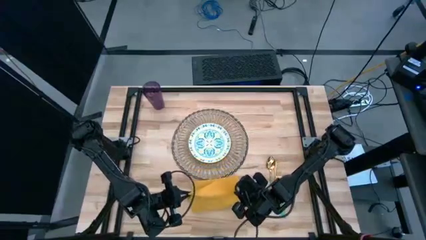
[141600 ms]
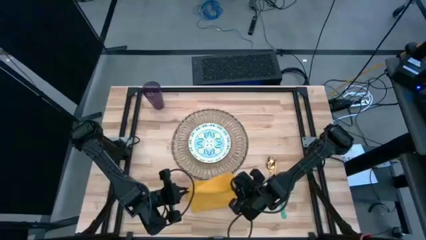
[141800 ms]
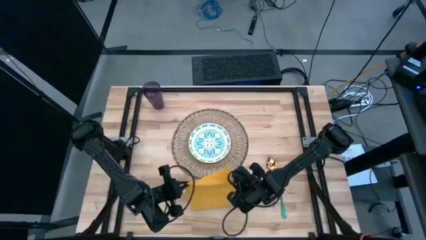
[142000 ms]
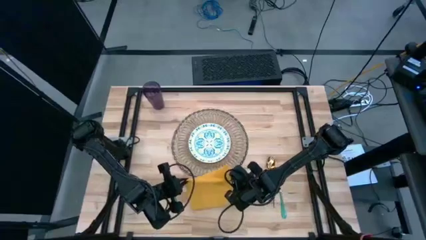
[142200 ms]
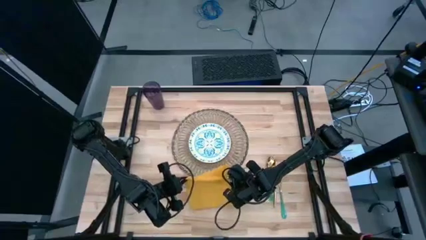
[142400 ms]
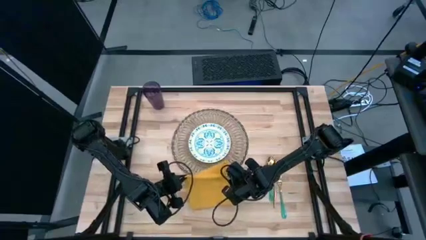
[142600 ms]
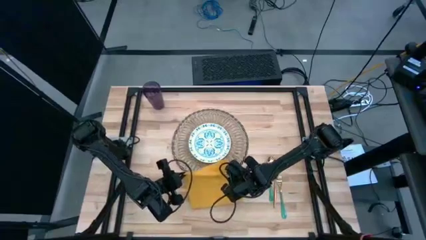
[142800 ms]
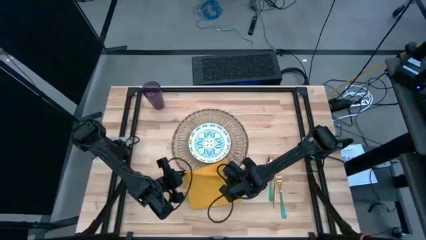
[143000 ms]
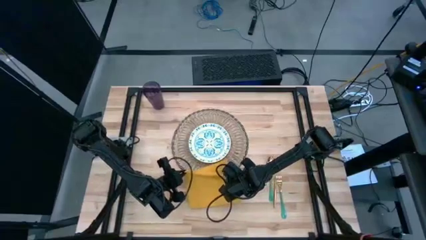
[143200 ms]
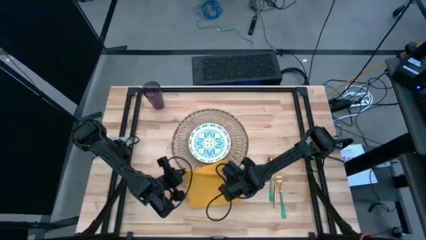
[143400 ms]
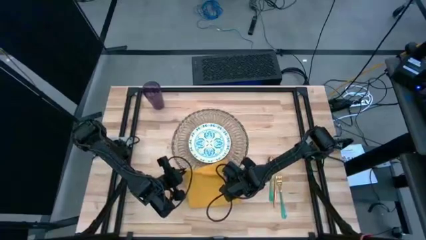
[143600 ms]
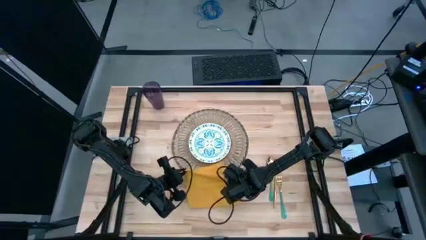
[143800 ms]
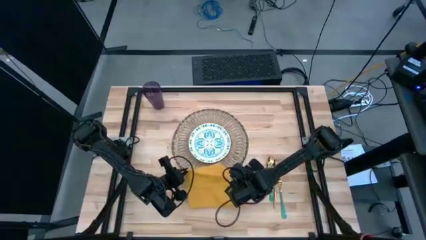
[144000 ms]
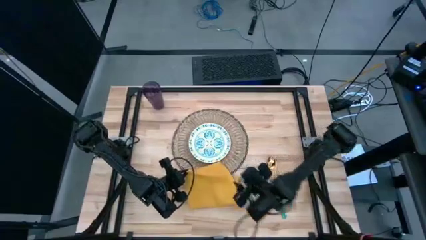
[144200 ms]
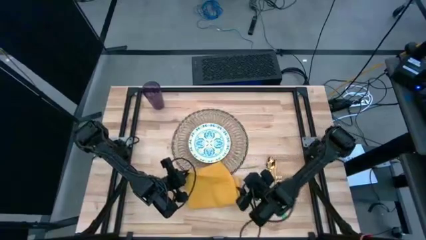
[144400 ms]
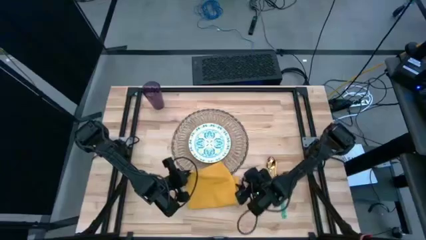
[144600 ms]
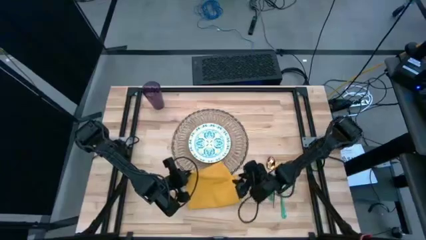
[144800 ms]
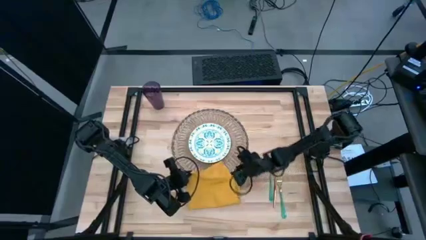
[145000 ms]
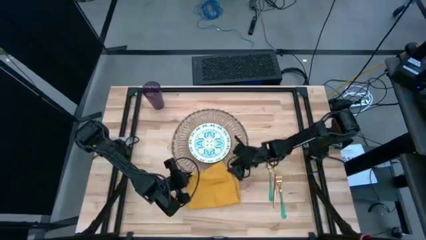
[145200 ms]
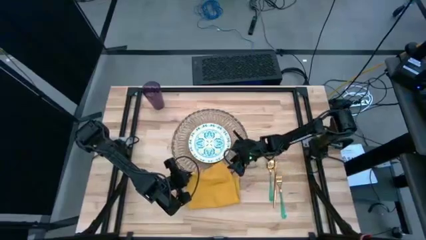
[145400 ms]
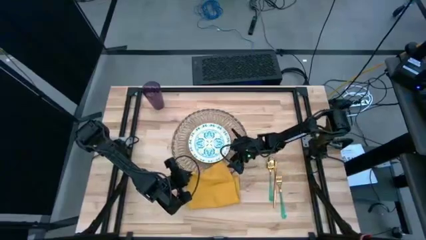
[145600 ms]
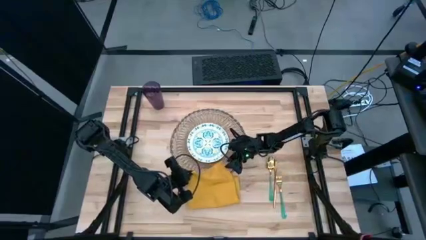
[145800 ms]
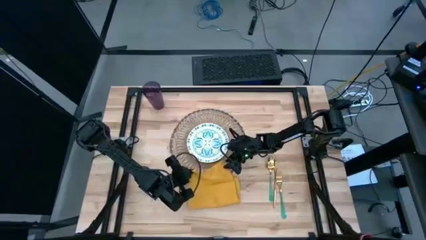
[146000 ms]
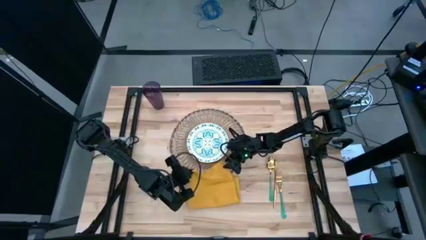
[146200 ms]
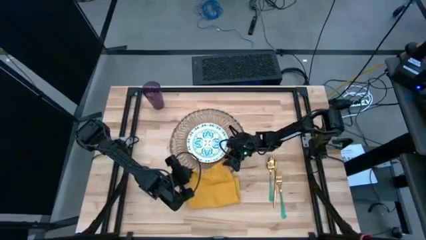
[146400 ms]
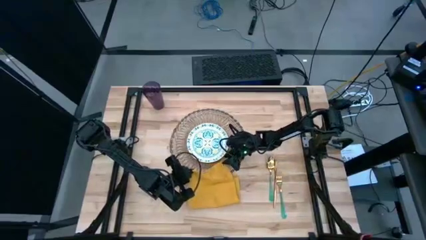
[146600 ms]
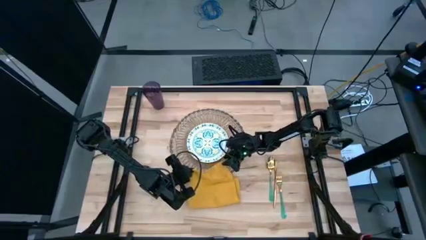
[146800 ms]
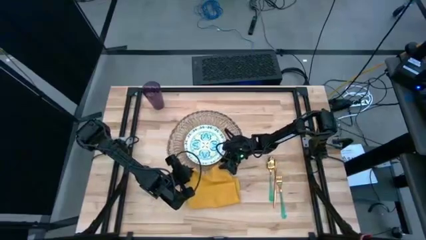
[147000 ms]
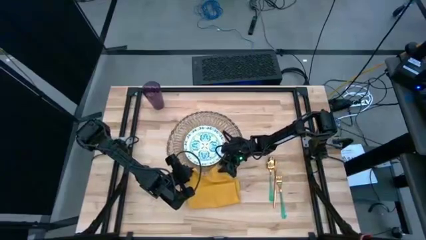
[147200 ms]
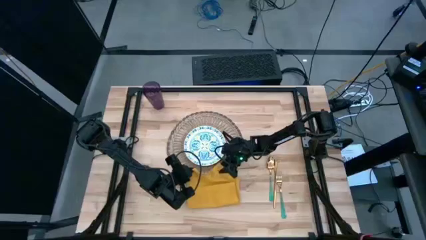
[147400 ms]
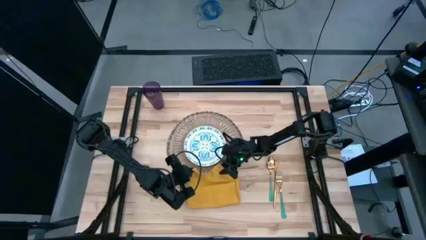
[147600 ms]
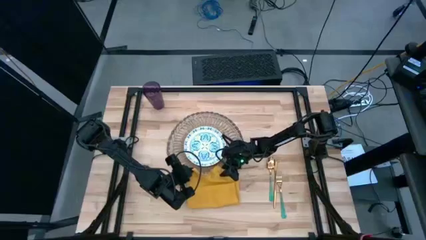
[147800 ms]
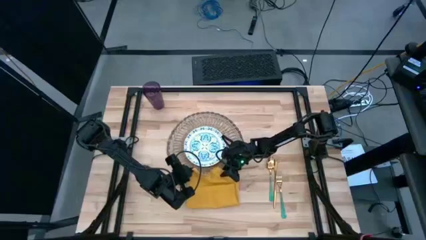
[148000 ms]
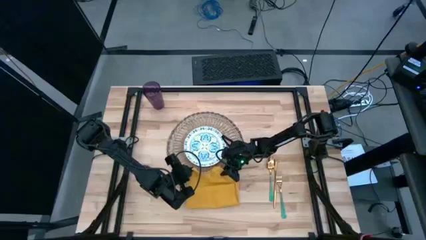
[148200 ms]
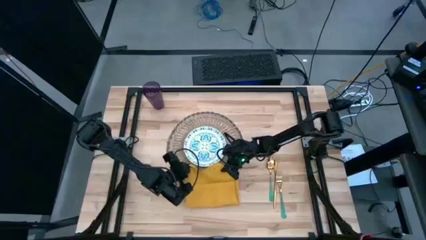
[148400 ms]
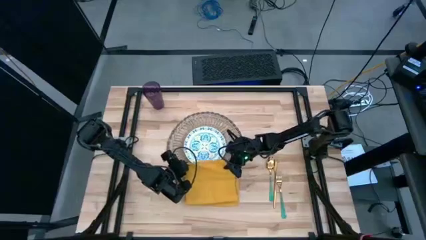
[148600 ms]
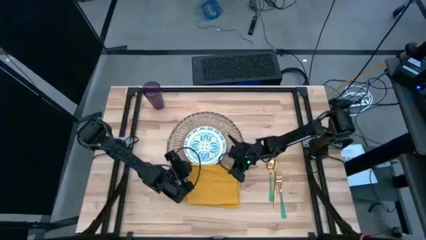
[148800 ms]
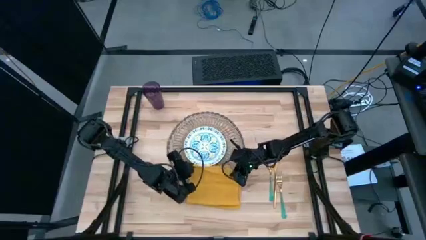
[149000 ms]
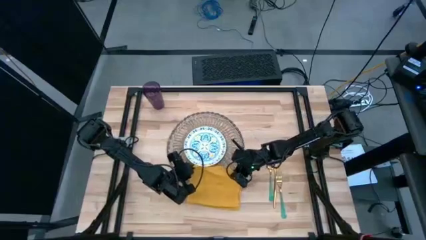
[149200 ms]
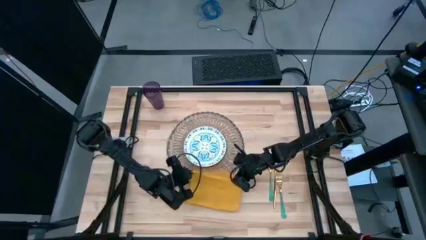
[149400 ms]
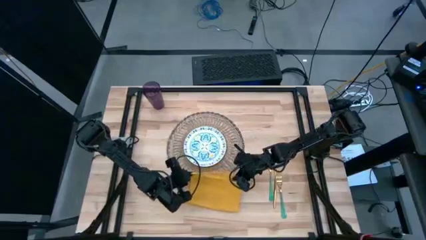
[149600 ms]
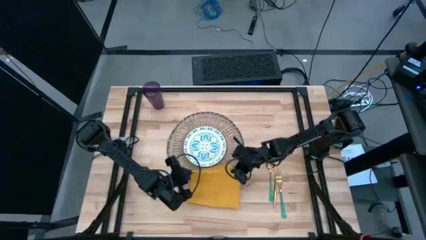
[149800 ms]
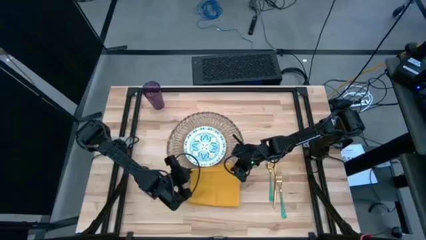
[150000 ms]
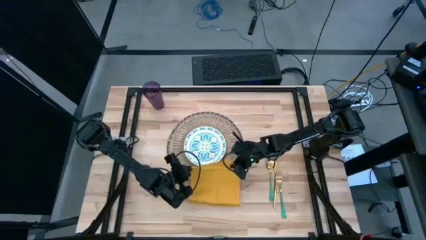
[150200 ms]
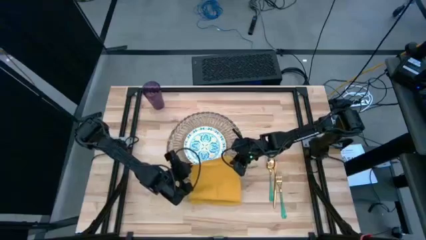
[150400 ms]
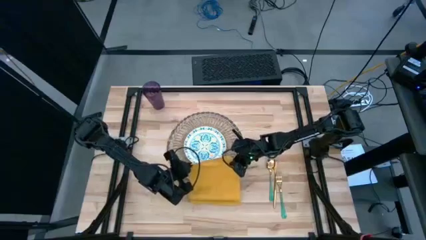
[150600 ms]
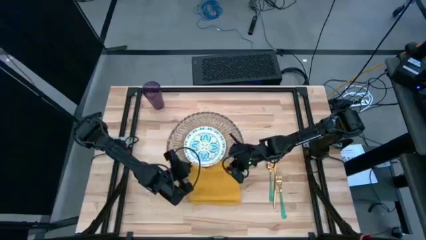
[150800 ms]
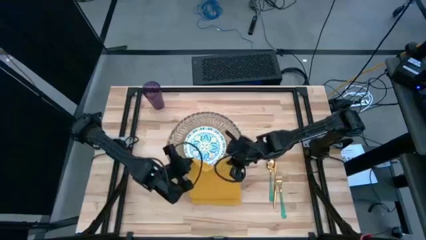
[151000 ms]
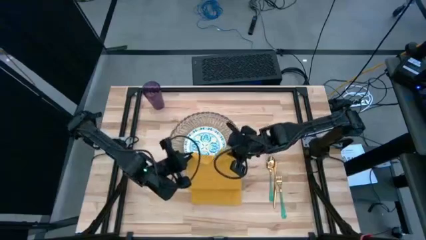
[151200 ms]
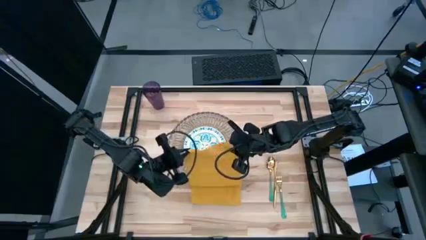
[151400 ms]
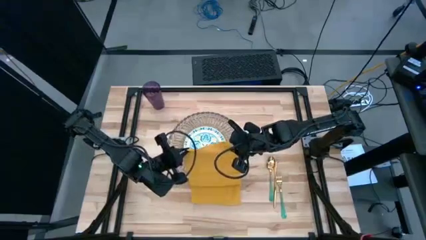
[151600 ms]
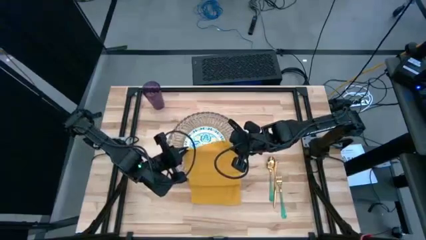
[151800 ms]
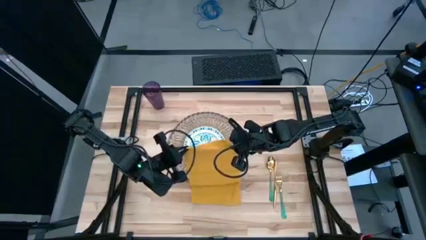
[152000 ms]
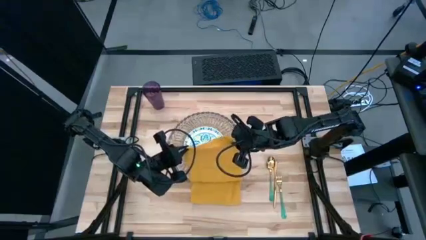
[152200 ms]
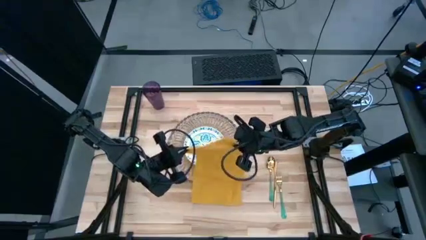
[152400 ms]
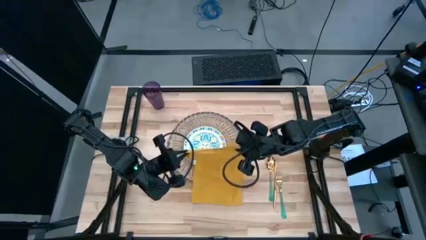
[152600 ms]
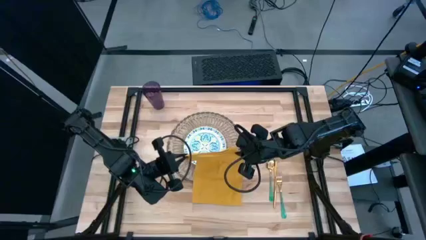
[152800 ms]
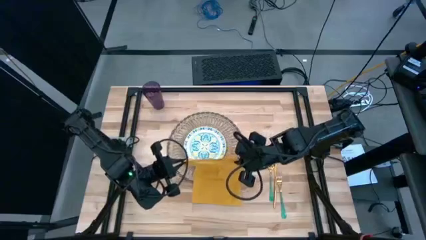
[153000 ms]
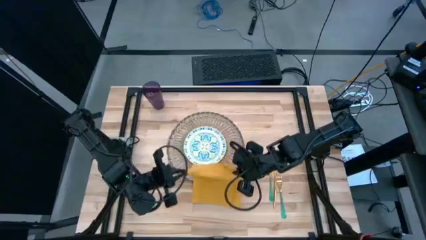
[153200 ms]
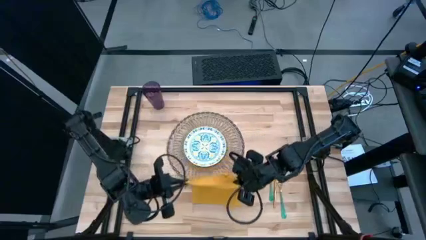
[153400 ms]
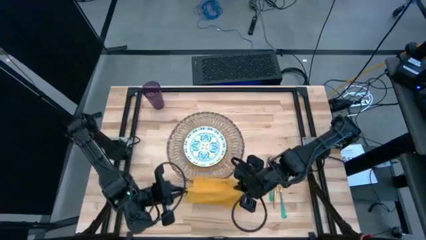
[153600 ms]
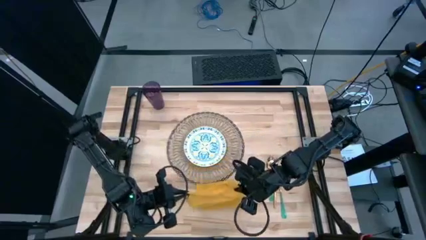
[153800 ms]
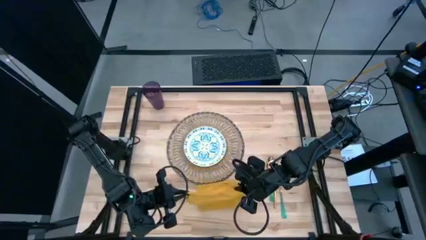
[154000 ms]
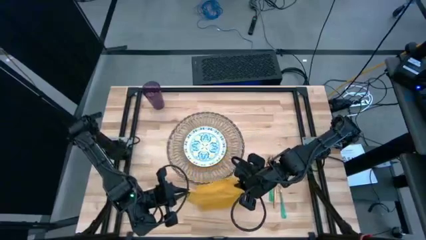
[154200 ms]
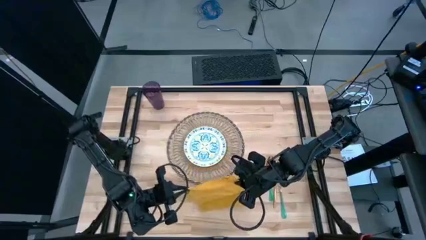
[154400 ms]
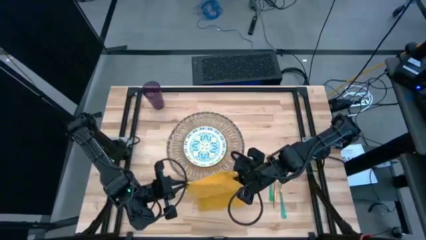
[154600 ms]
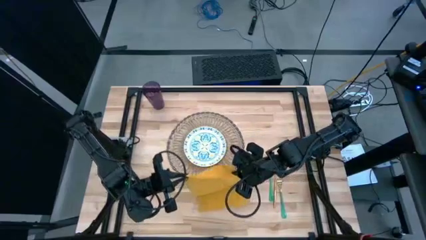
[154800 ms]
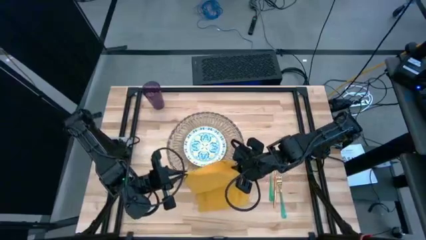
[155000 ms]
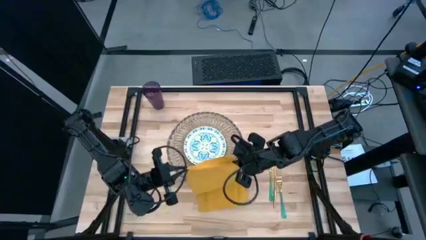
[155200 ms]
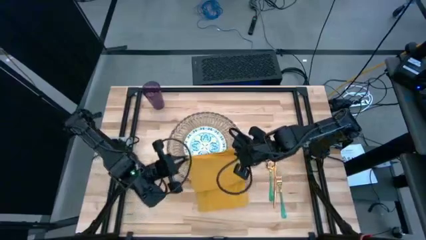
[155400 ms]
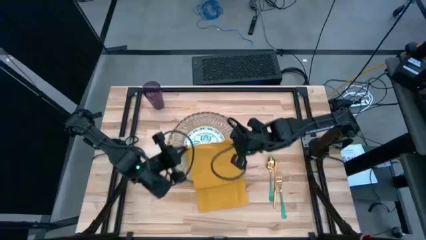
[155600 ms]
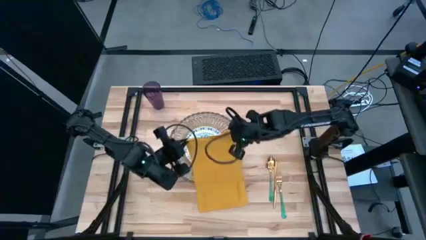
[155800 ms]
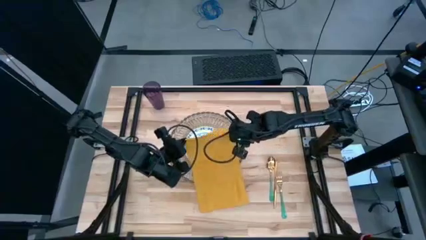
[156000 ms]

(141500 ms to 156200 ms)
Task: Set table place
Fold the yellow table napkin

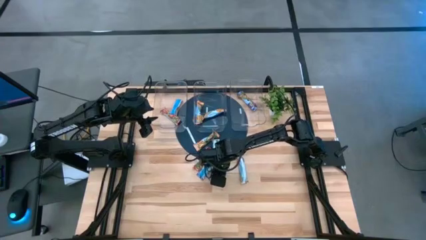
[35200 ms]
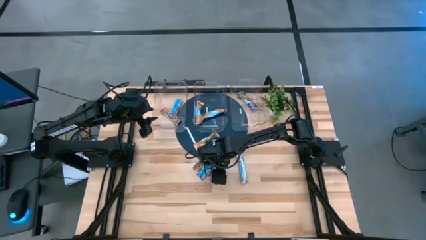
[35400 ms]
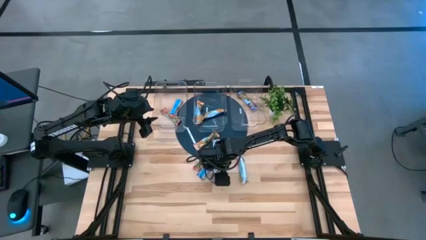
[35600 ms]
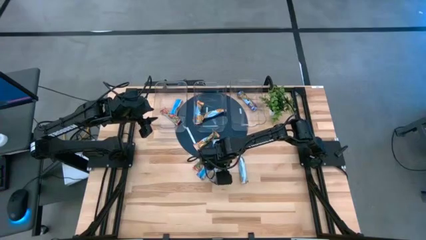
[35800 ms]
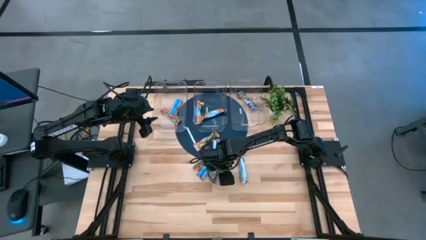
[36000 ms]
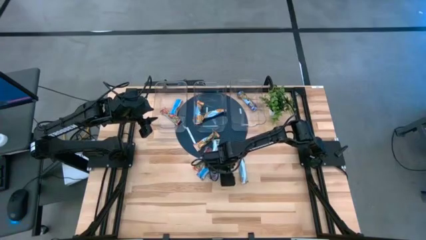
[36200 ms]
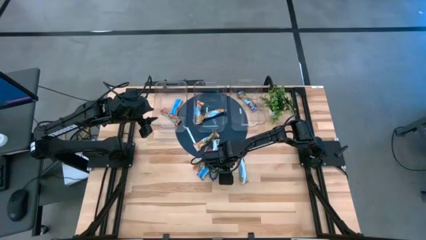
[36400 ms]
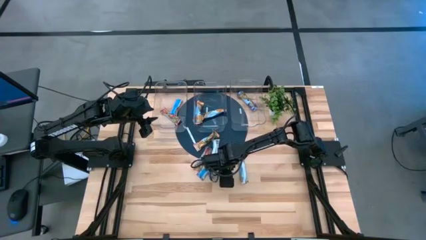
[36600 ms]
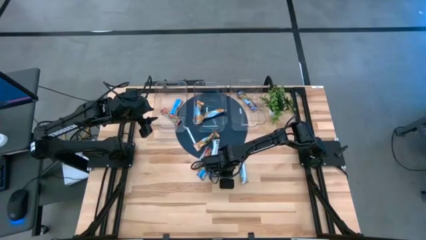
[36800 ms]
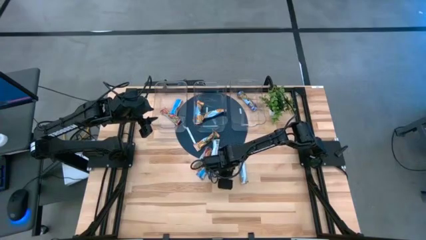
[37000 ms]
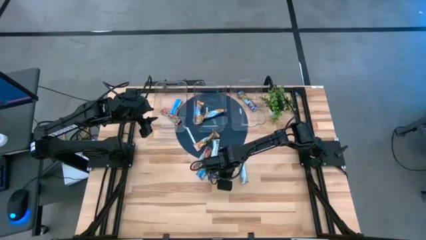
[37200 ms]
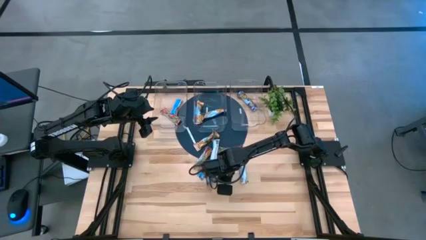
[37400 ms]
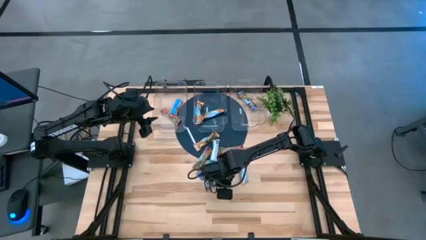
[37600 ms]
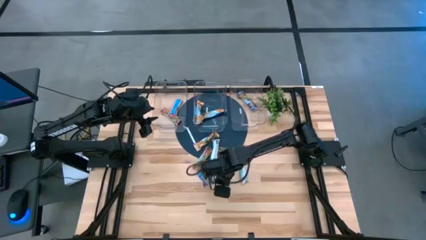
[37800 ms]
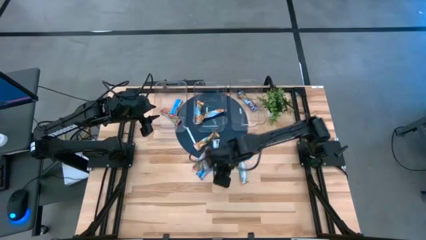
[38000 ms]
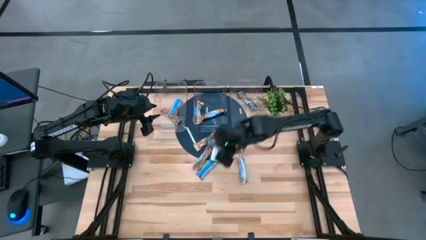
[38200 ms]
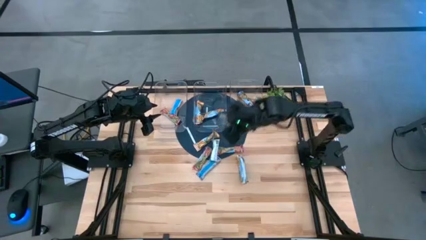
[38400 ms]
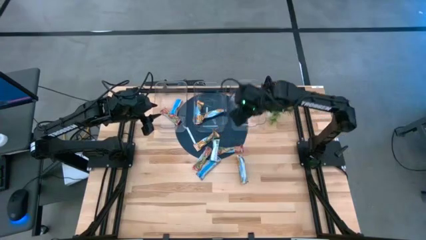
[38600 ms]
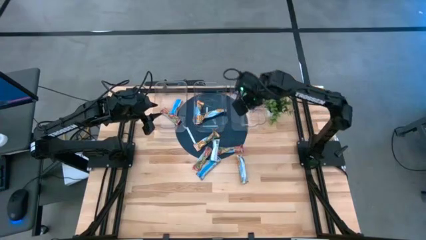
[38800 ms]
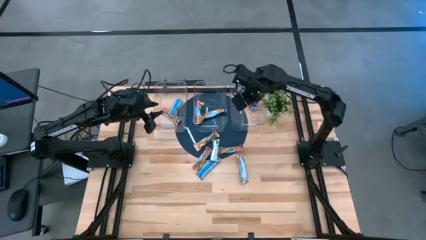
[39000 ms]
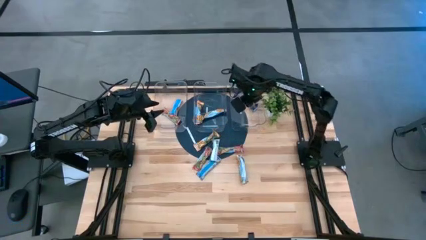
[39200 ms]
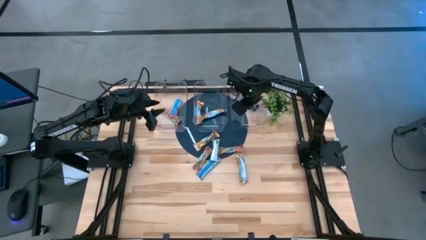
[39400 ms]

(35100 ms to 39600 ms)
Task: Pick and place Granola Bars by type
Put the blue granola bar into the right transparent bin
